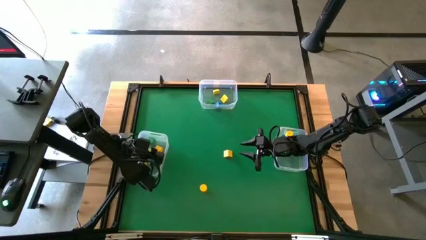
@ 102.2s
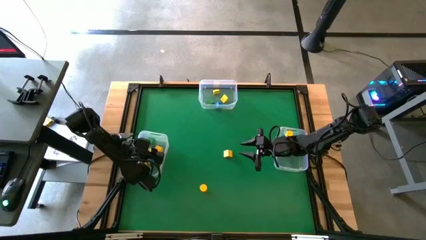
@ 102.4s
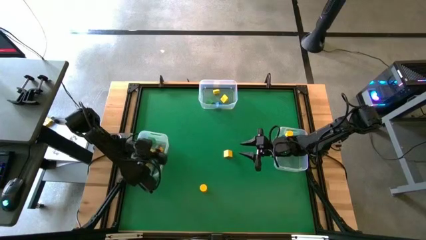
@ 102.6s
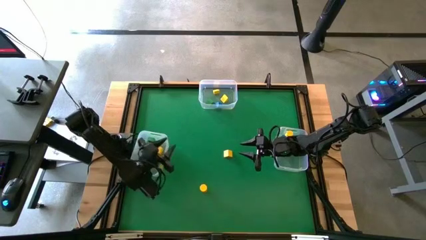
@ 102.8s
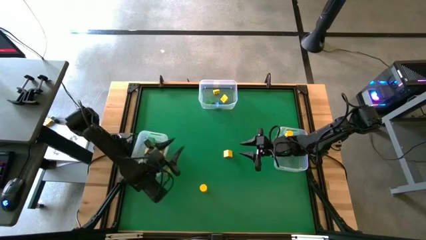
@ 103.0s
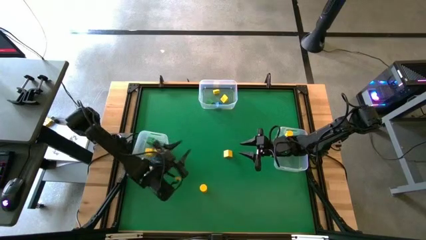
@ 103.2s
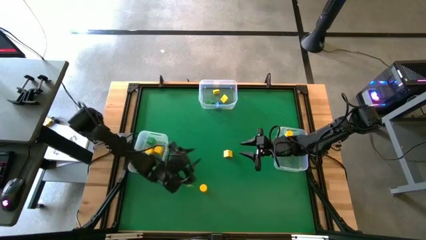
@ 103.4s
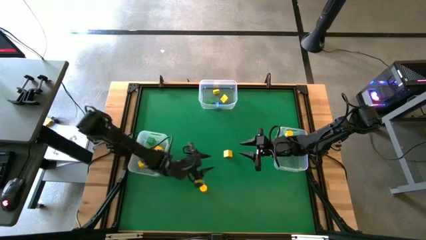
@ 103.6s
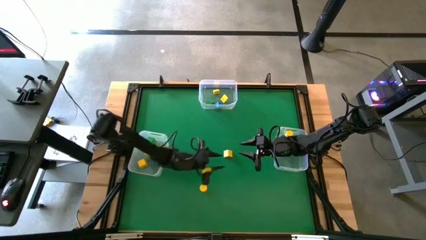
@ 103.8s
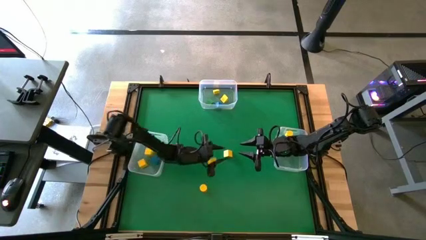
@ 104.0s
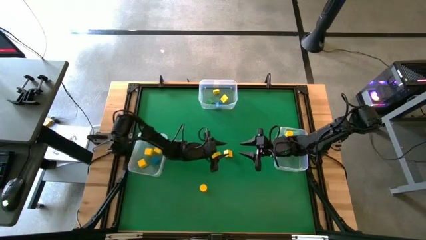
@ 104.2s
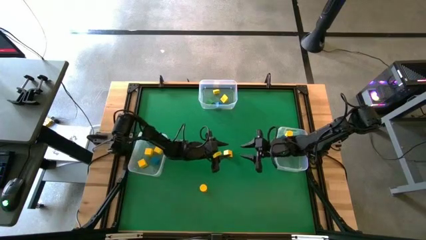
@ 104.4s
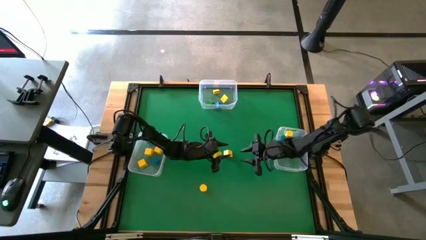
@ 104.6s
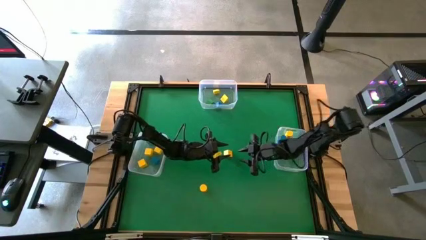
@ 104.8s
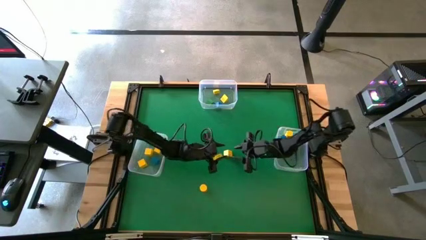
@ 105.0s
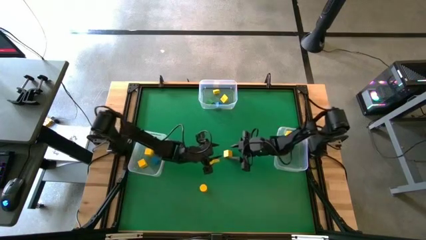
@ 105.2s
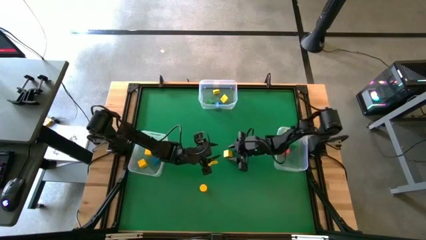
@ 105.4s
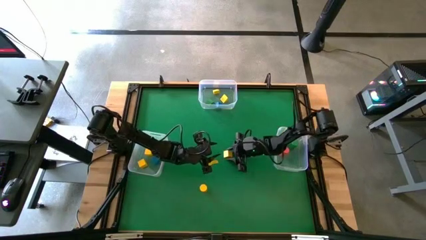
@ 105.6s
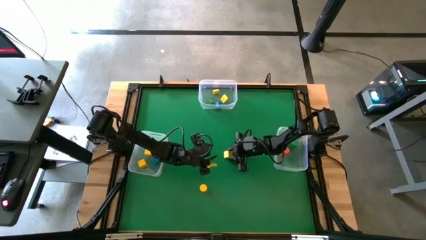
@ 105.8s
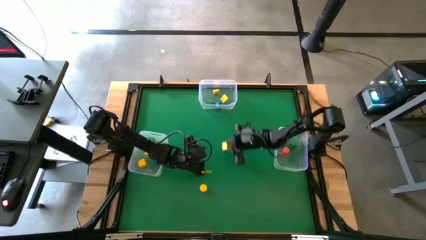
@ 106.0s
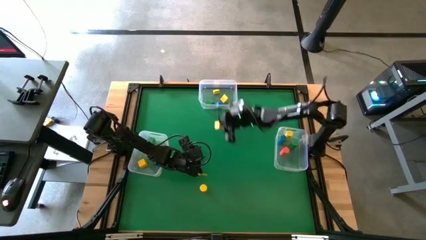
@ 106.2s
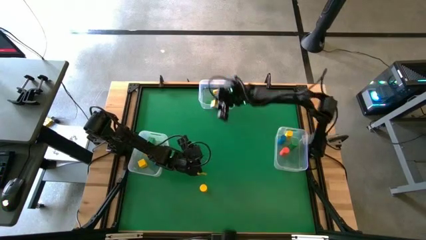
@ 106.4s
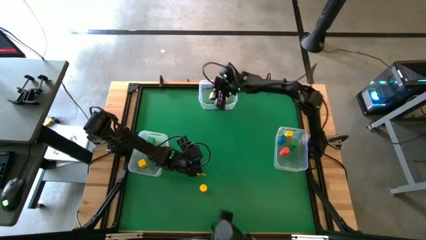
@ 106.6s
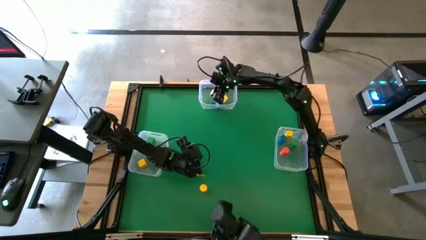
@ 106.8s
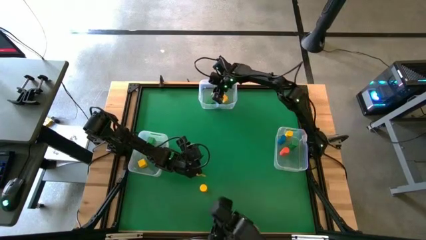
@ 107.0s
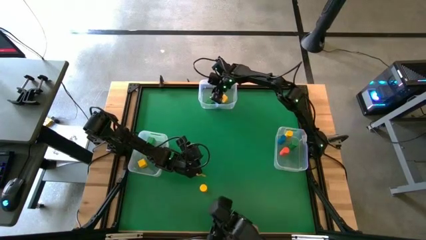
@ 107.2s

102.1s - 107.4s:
Task: Sort blocks by size
Put the yellow triangle block into the top transparent bin

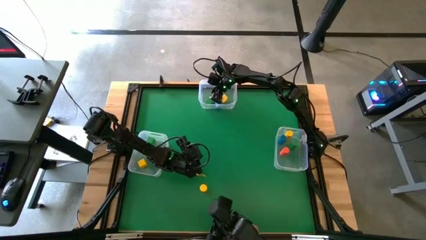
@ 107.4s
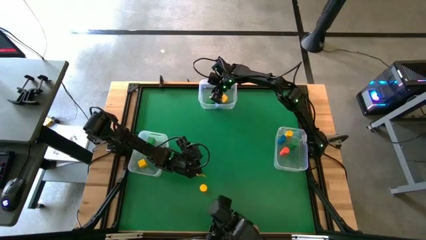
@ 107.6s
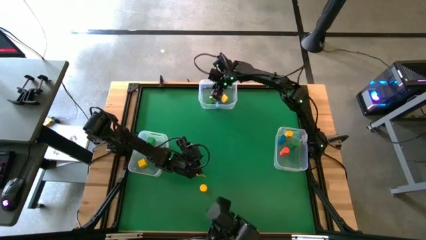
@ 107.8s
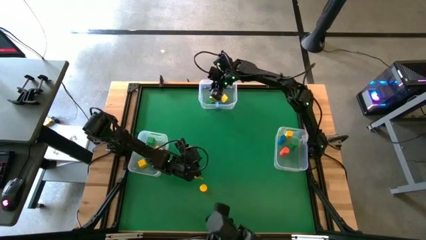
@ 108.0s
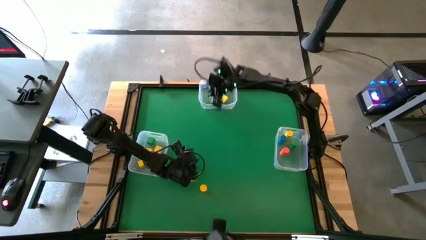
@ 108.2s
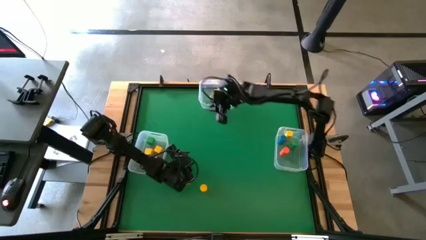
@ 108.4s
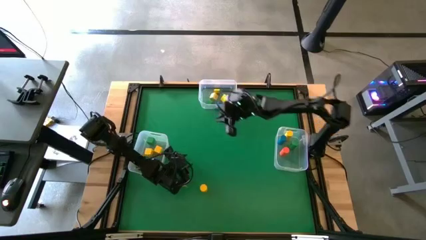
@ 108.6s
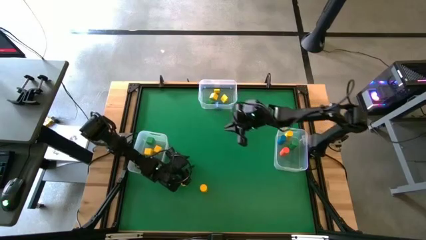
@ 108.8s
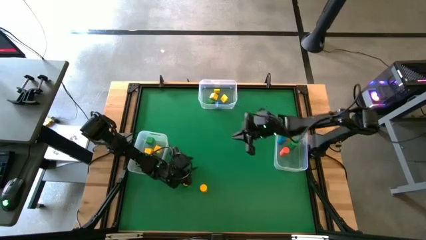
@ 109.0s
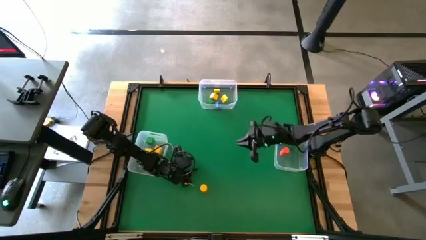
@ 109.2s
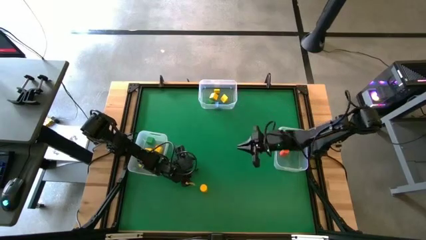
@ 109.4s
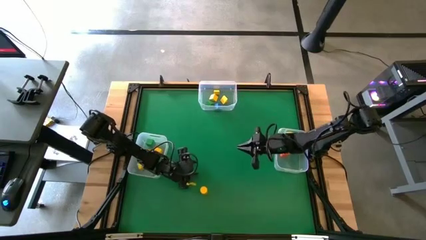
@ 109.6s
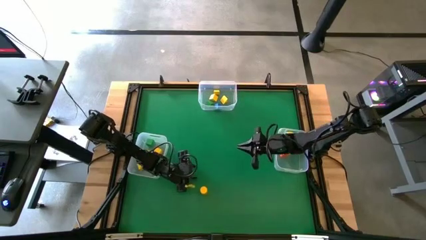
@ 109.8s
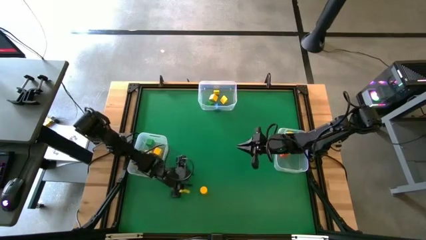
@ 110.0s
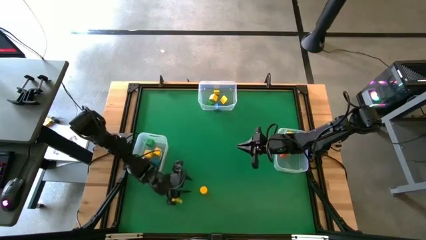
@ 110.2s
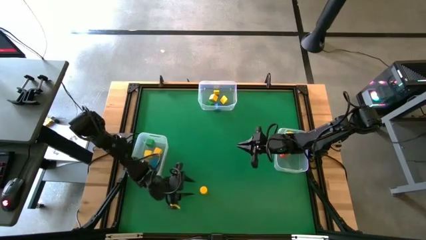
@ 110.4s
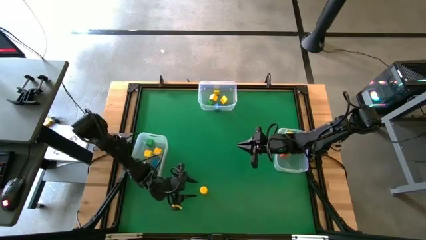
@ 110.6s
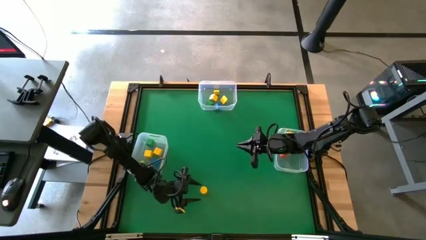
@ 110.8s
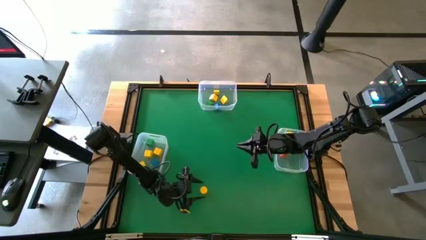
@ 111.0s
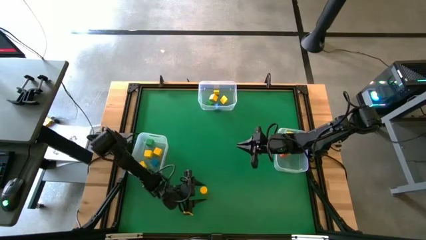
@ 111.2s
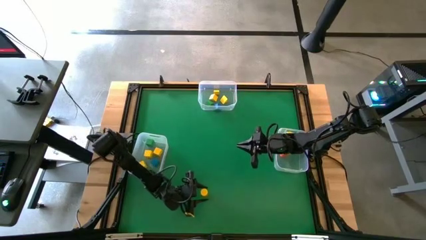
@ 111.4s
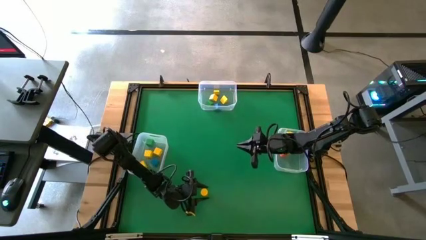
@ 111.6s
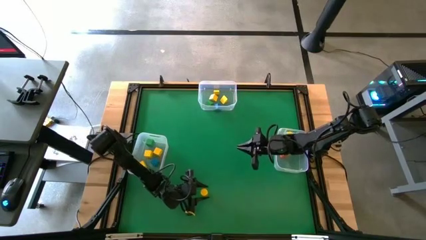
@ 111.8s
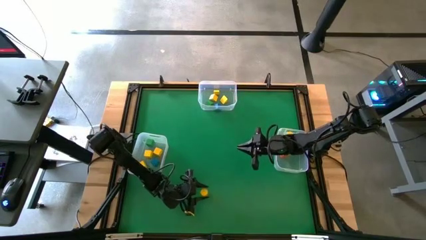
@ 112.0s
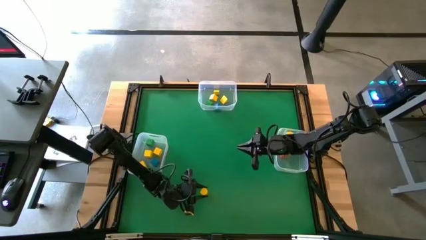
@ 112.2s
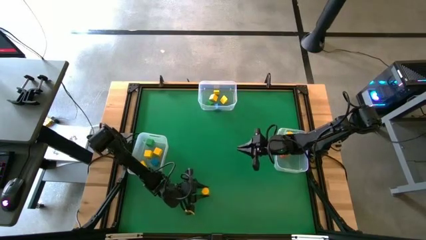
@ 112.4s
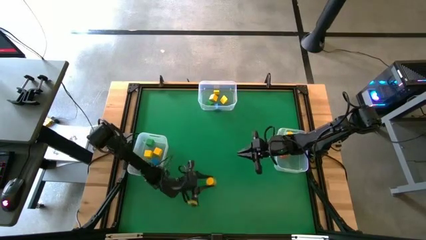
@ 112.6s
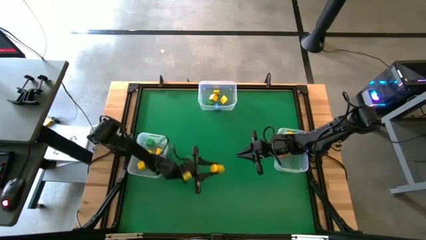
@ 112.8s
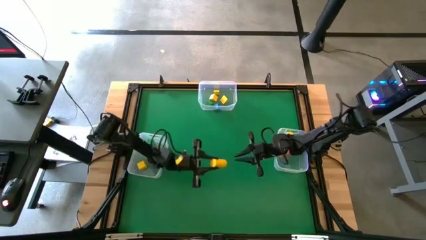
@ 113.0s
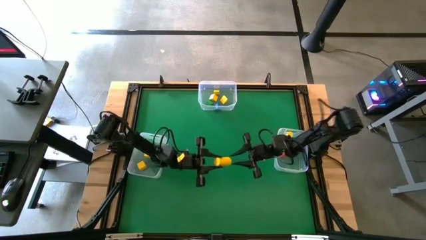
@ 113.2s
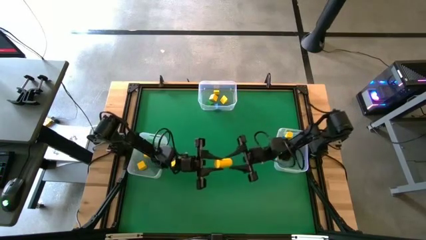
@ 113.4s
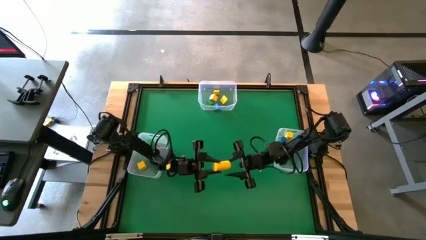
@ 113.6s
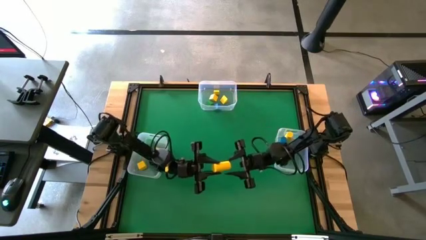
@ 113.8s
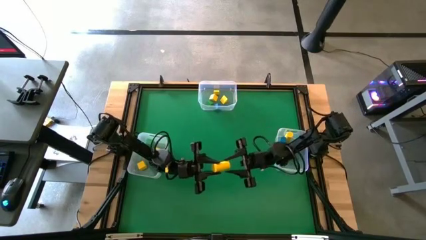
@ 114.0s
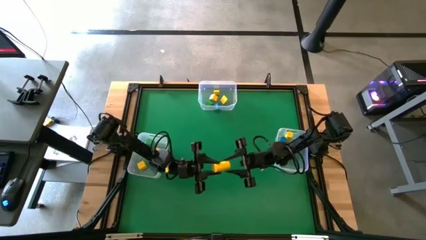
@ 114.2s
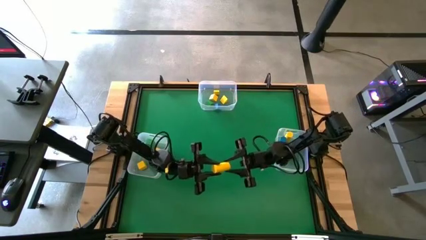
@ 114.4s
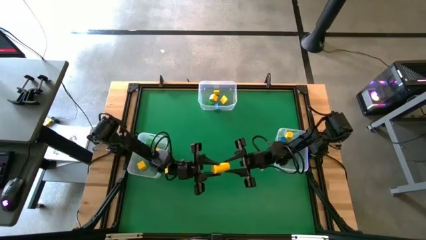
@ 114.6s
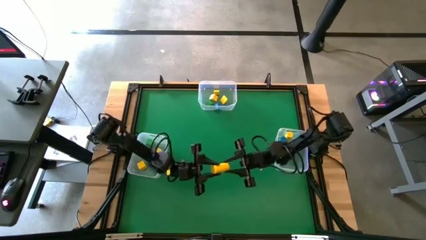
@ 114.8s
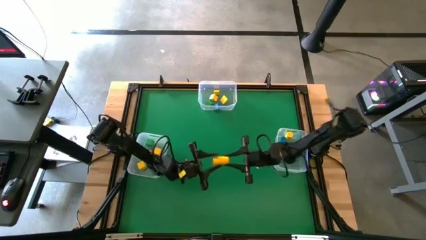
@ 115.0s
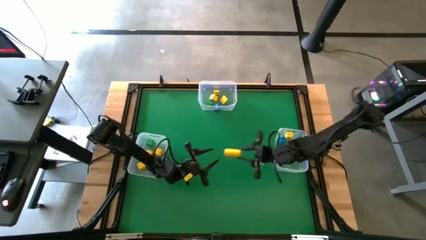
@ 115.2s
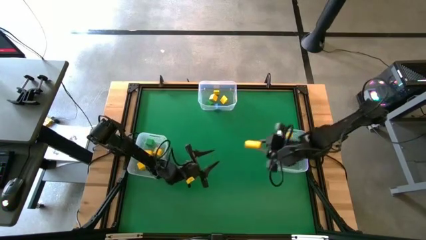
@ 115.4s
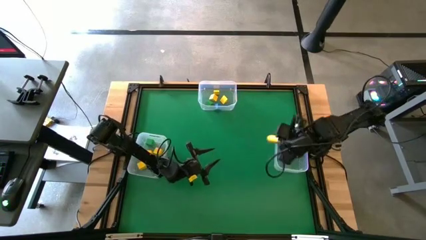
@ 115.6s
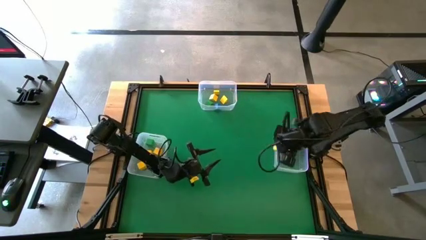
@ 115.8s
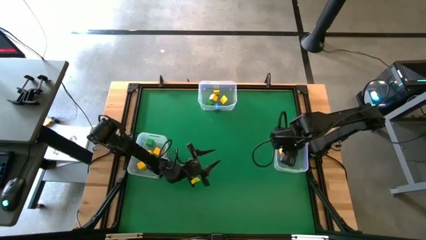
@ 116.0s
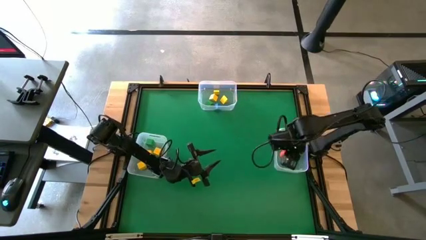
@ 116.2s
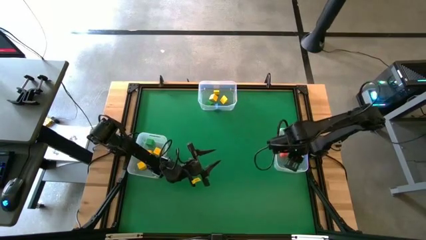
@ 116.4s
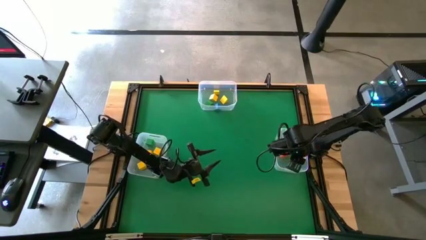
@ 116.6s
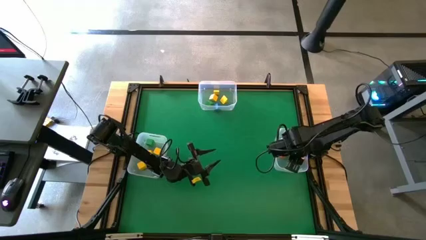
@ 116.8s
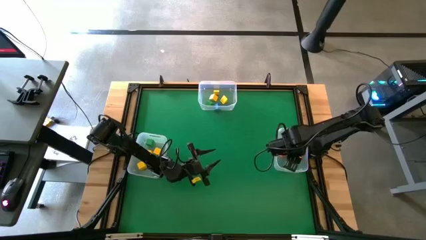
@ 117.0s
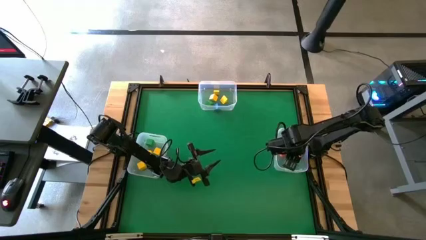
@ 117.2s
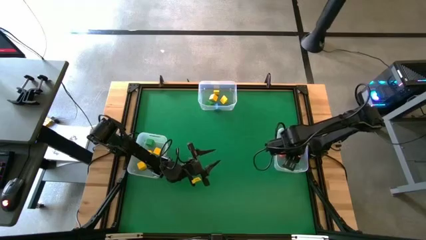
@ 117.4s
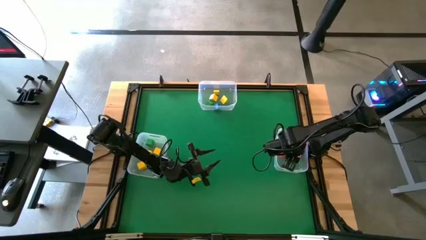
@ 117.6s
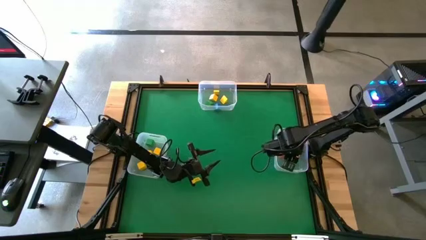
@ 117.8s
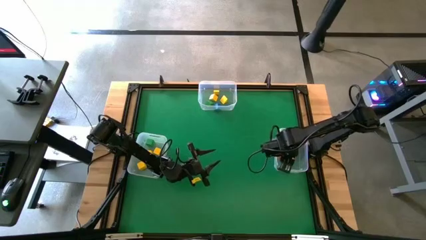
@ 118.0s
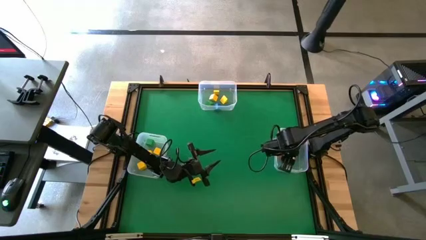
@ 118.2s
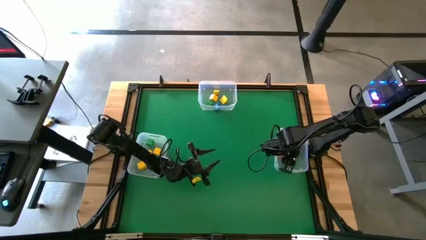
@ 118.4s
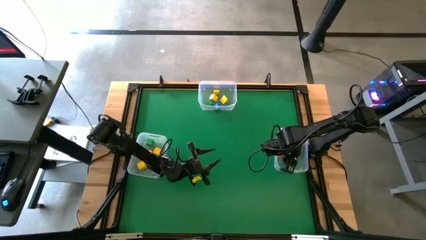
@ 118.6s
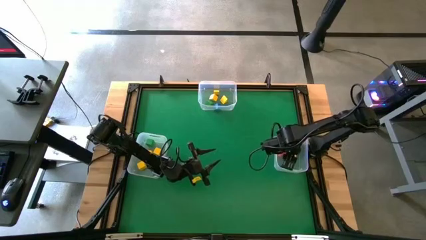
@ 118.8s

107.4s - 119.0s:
Put the yellow cylindrical block into the right transparent bin

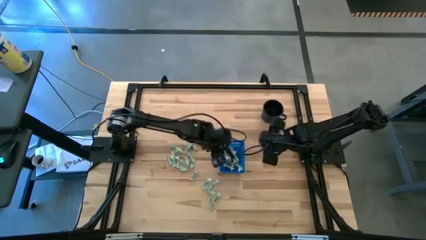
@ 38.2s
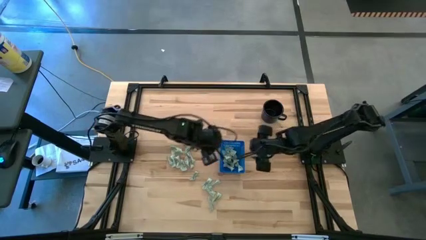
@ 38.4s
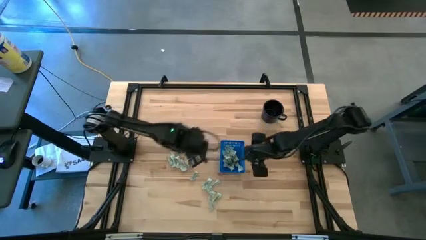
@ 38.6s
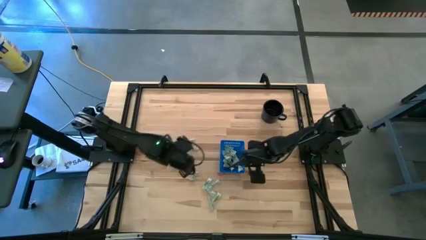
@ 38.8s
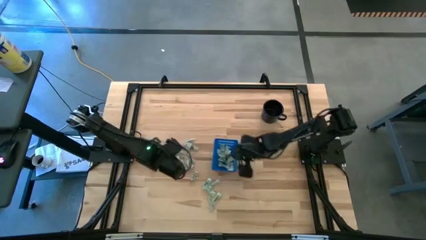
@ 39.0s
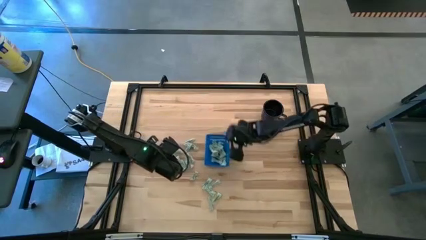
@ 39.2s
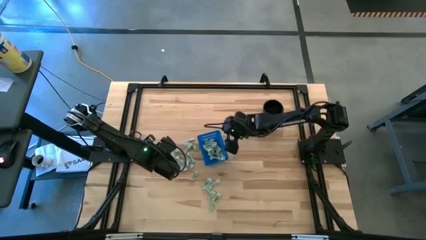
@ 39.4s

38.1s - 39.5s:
Task: Pick and place Stevia / Truvia into bins
Adjust the basket on the table
